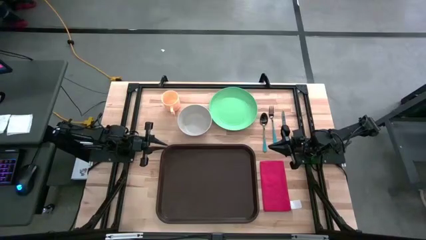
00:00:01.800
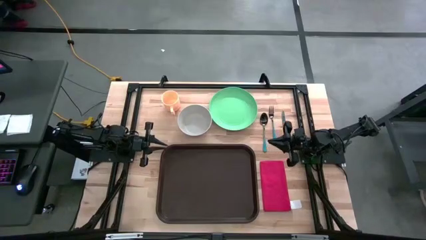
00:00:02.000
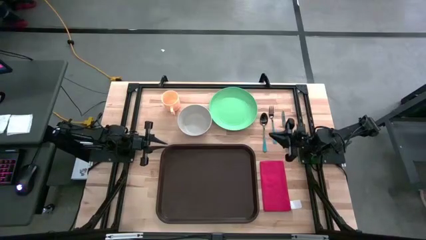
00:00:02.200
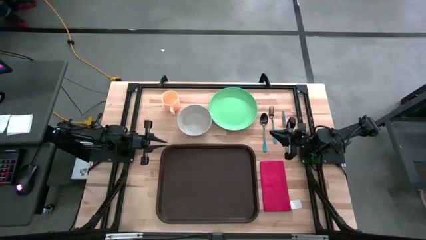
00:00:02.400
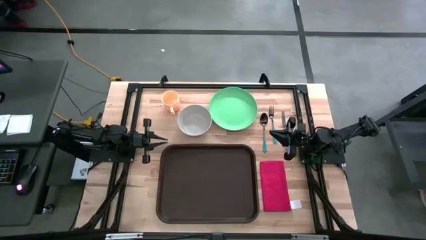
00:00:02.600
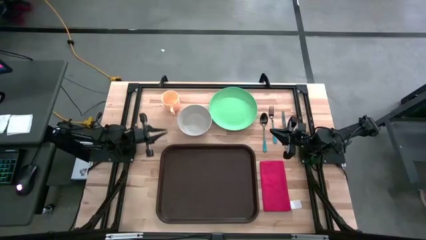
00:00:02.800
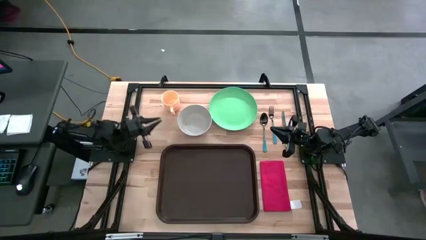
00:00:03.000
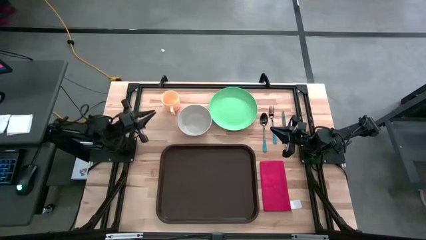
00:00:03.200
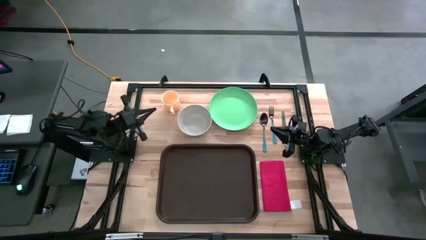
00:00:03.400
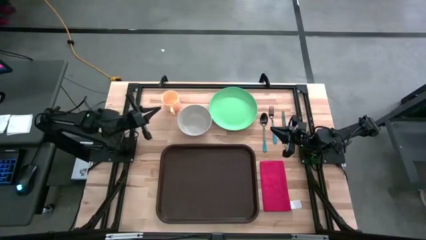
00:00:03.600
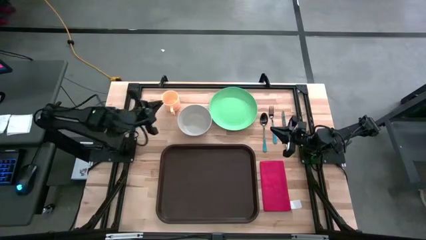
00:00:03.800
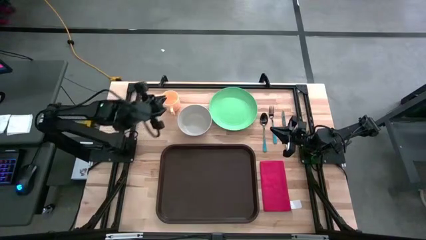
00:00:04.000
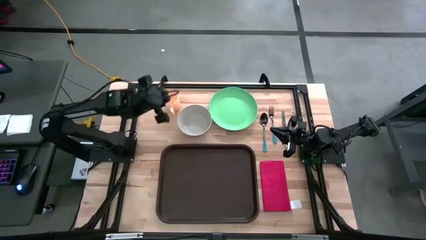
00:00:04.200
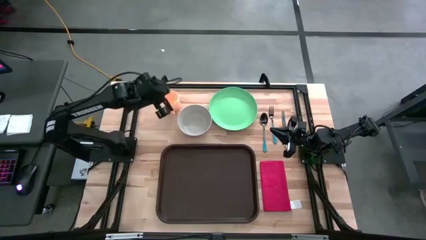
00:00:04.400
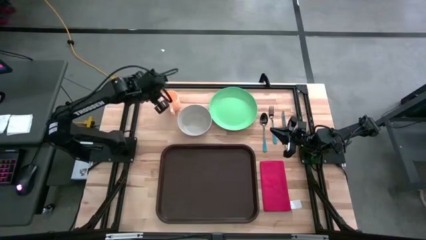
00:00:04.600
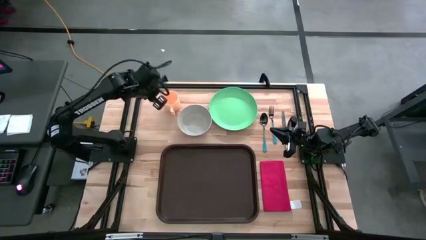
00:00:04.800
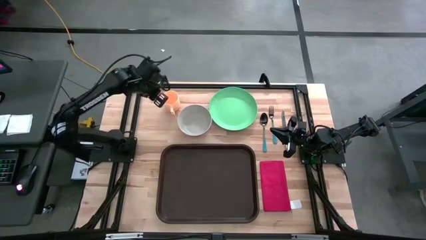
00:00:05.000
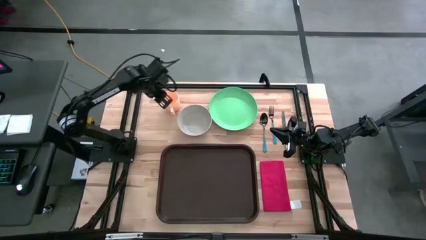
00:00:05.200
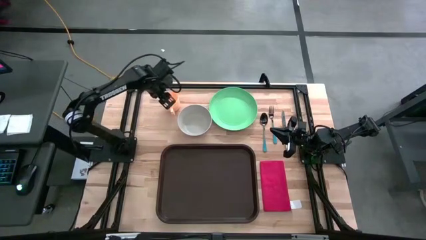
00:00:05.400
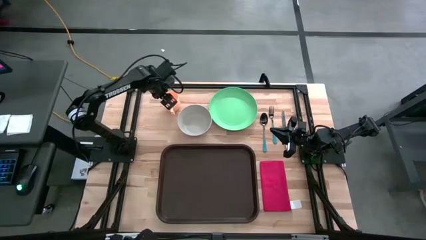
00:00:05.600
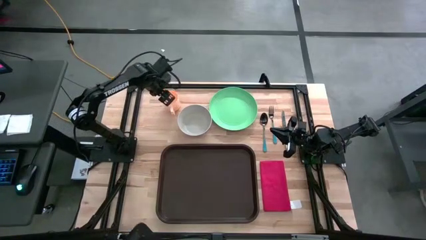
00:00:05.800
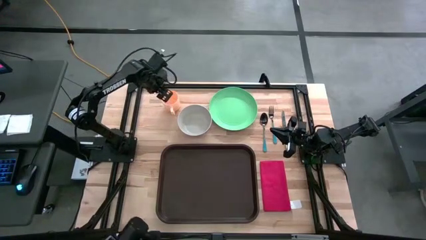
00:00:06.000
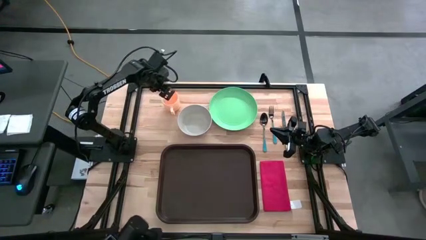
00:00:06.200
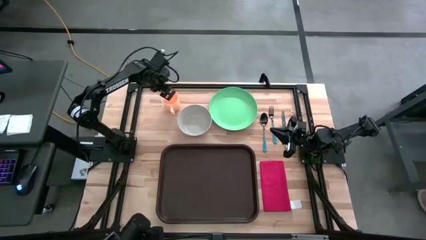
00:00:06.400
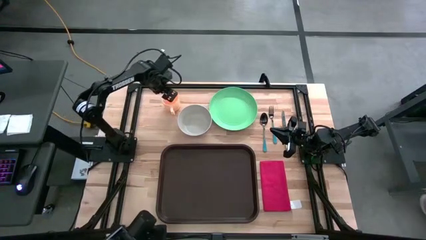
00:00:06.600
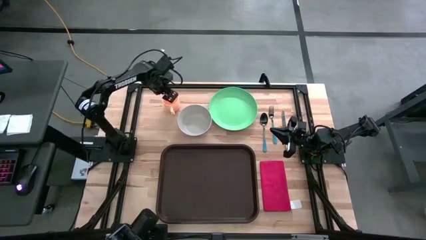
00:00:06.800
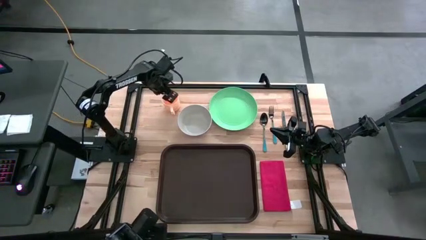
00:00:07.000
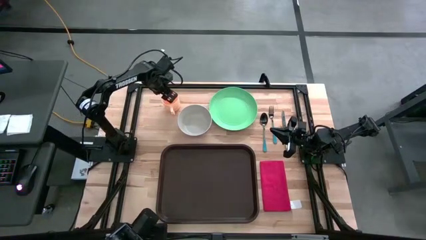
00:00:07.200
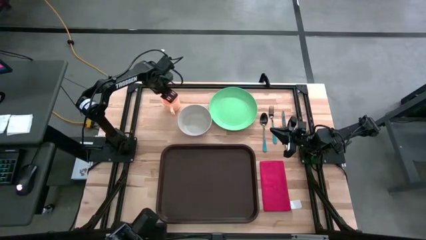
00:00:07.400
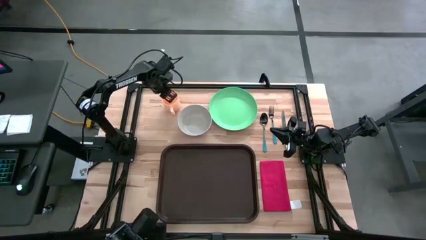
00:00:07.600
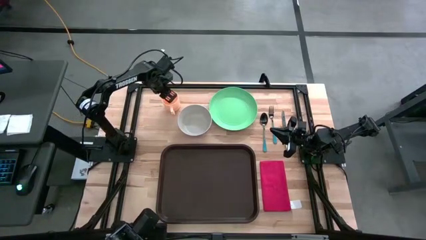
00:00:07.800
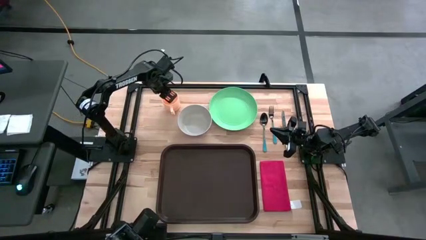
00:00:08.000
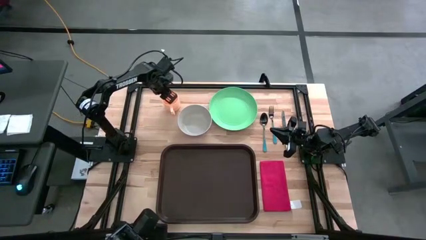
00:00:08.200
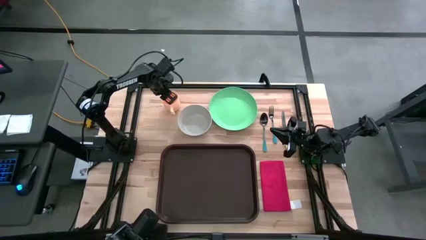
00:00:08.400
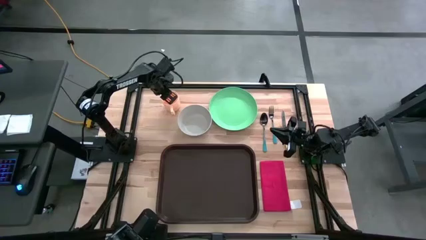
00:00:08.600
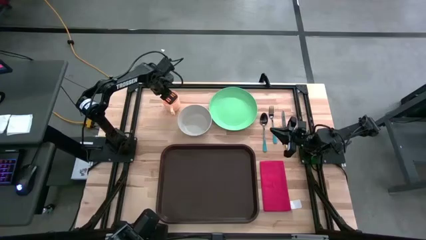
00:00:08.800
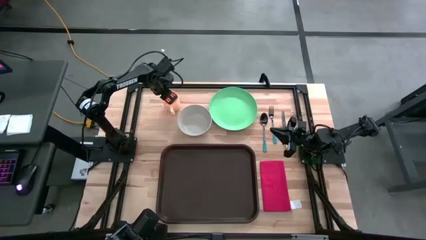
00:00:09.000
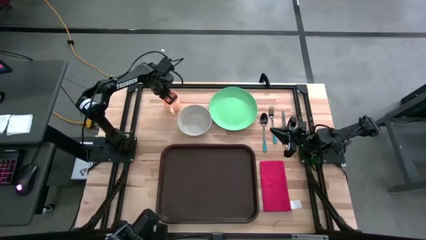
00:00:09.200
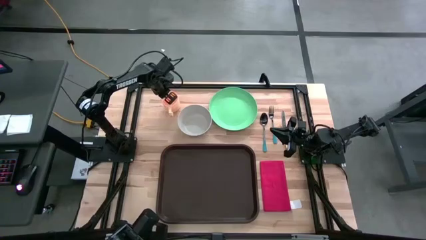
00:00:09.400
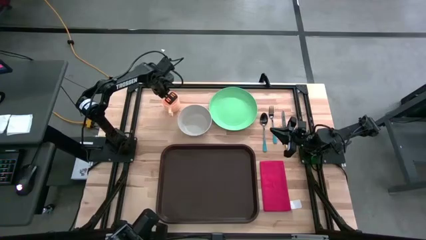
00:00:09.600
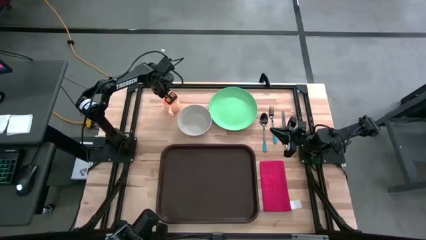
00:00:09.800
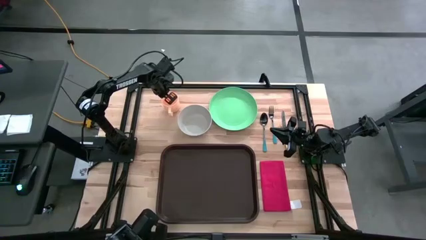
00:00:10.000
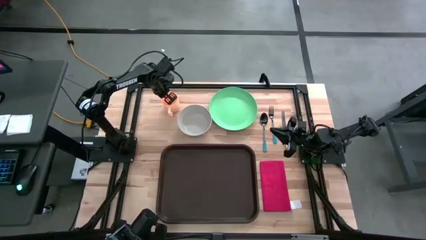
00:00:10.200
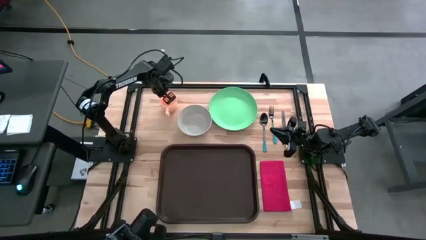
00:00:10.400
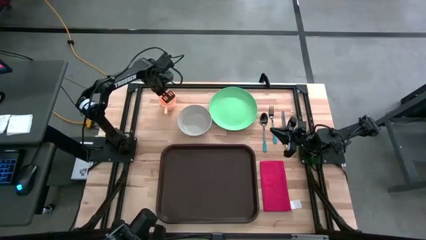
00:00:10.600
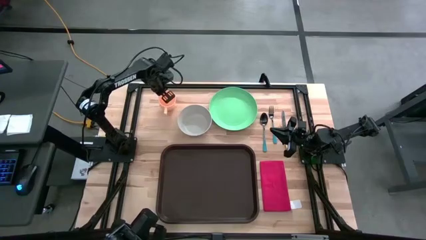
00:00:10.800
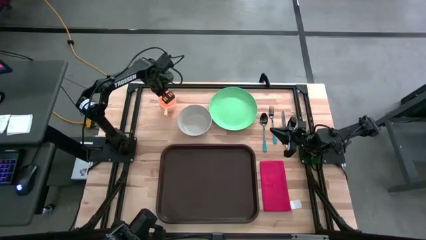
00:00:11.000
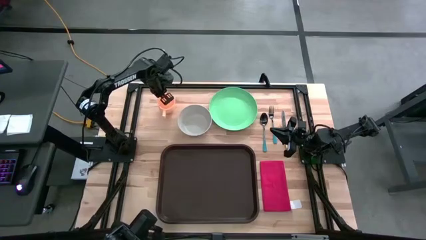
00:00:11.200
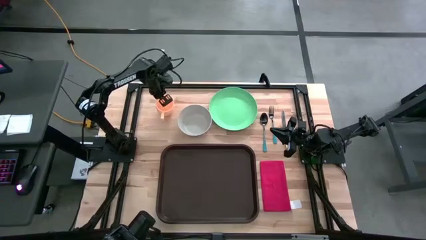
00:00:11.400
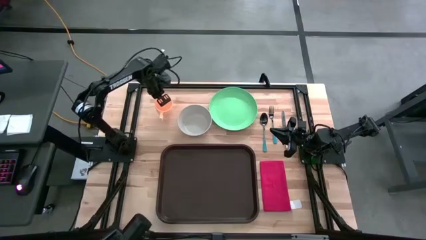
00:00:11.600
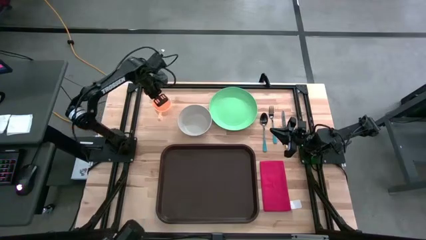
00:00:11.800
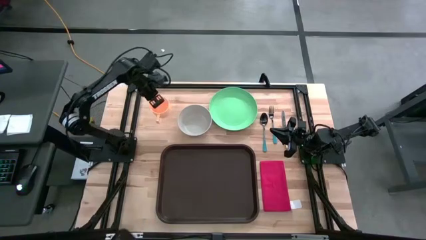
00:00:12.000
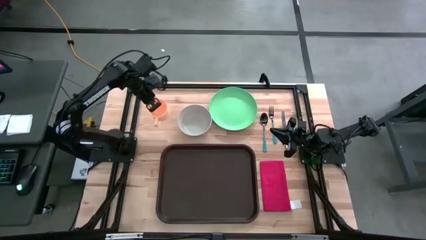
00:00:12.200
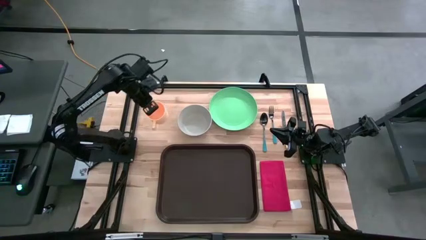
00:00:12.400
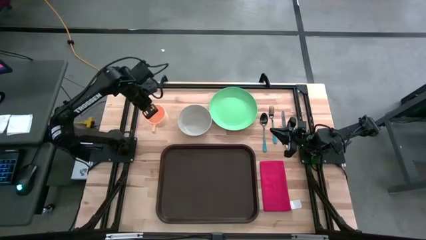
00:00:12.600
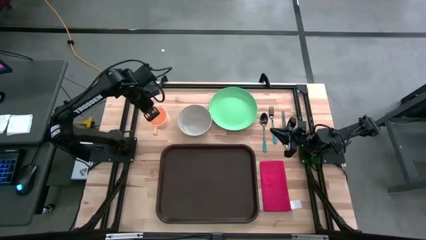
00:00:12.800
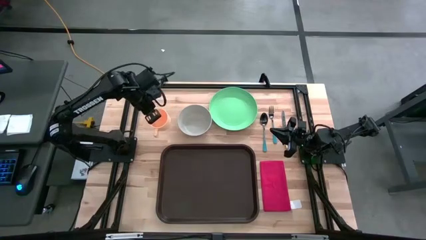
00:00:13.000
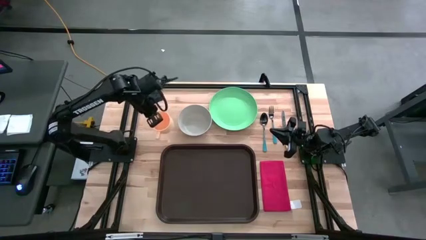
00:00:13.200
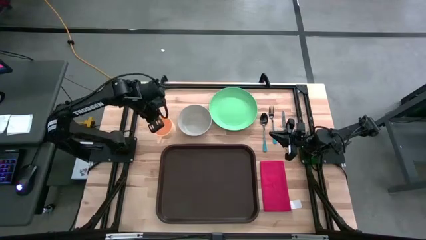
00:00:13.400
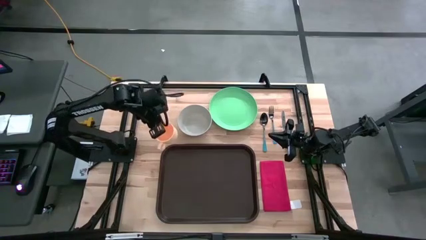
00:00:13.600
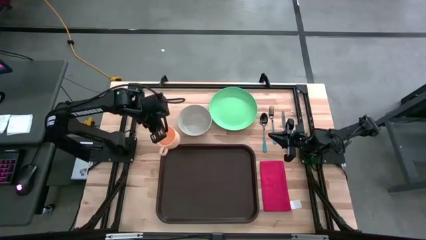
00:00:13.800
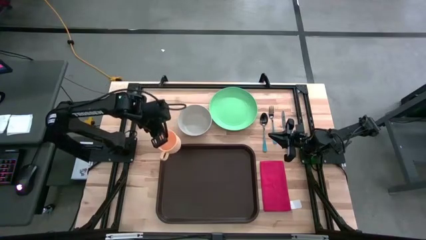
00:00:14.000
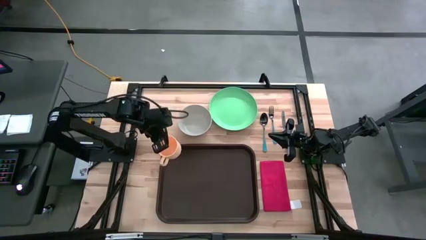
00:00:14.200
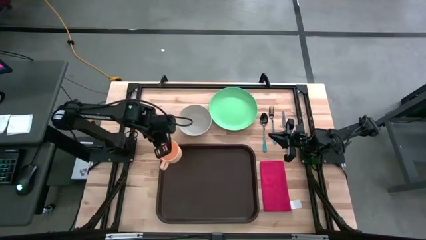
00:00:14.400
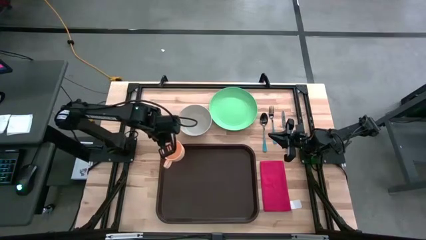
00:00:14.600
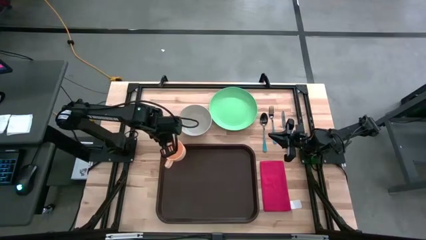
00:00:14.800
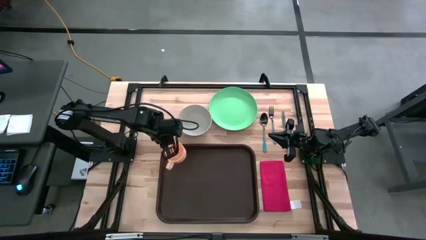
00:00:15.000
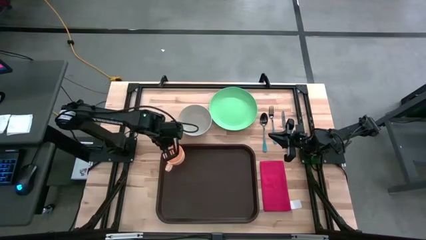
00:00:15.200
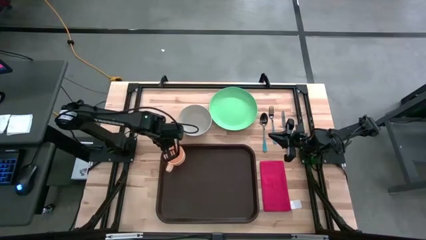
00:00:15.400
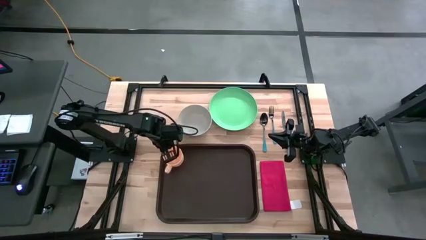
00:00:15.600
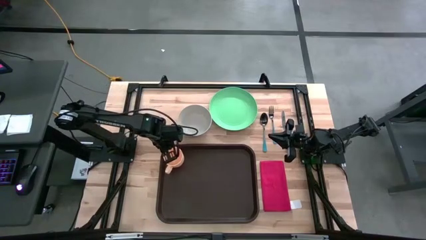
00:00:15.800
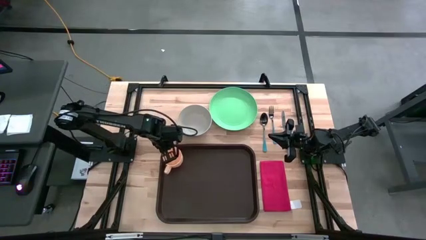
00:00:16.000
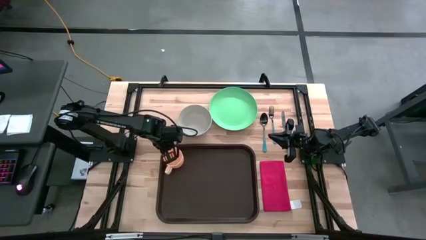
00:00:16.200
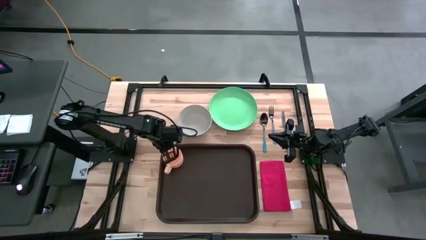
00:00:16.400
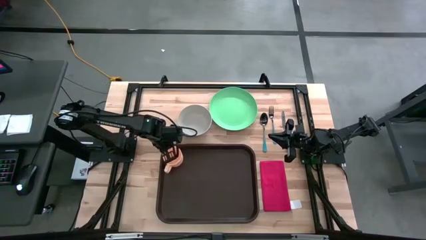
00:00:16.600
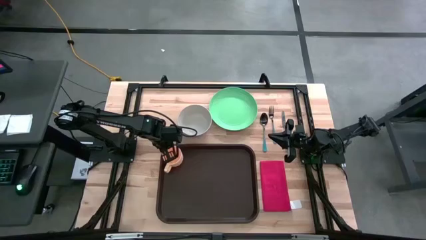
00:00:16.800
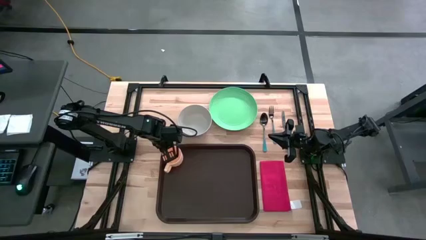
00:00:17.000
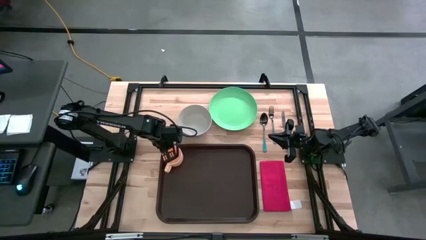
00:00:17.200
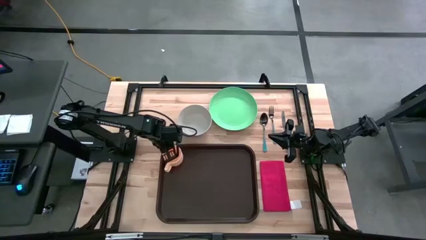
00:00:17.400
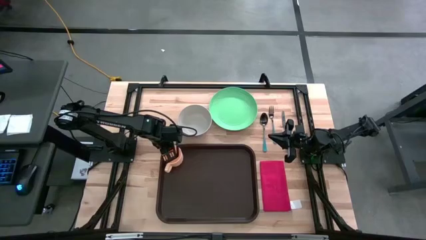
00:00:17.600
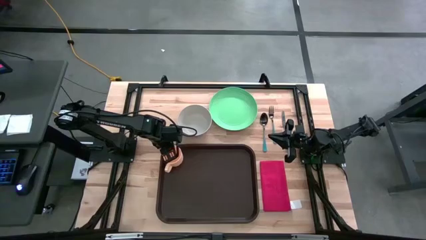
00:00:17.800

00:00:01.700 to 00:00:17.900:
Task: Set up tray
Put the mug on the brown serving tray
